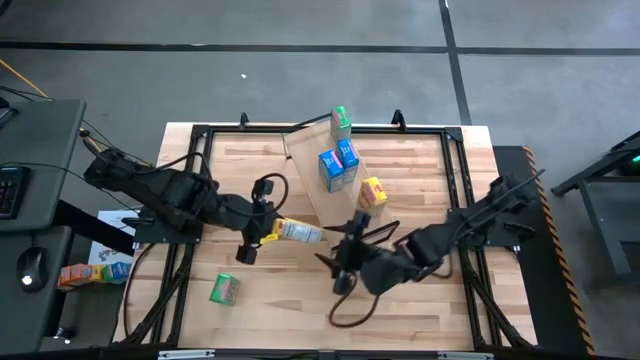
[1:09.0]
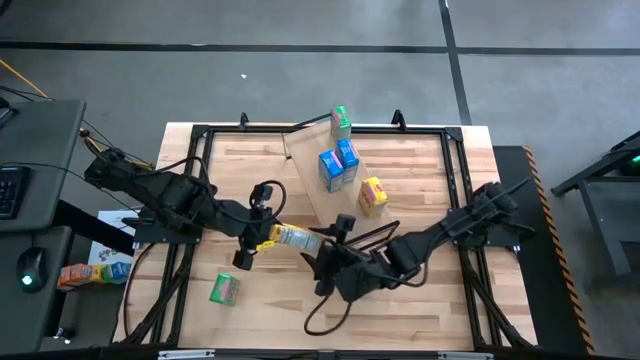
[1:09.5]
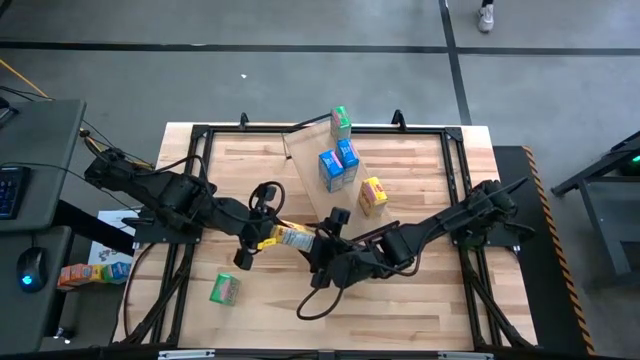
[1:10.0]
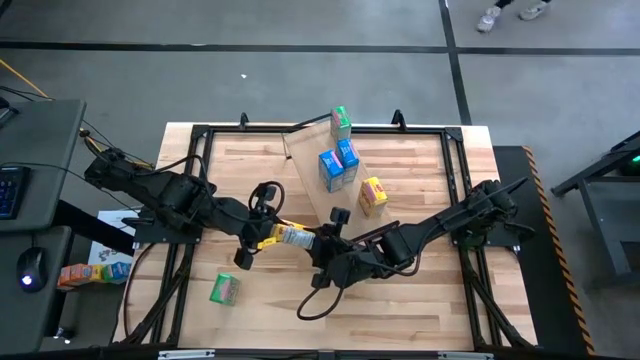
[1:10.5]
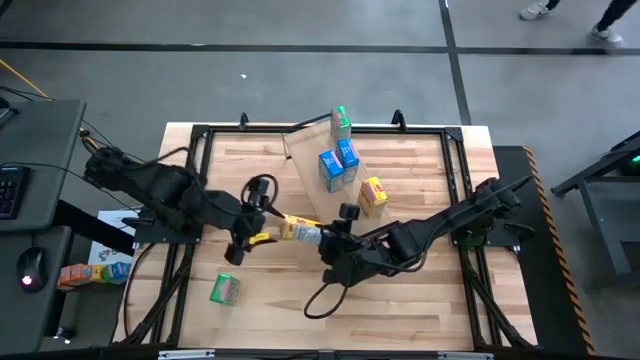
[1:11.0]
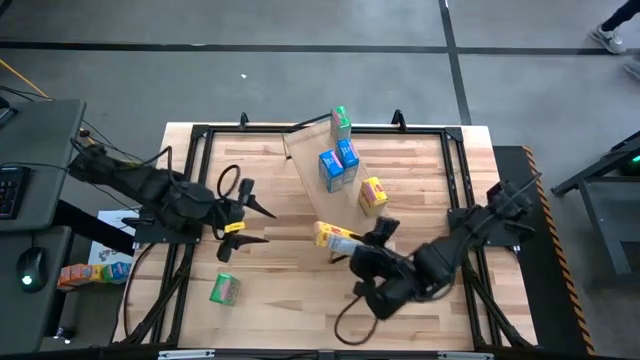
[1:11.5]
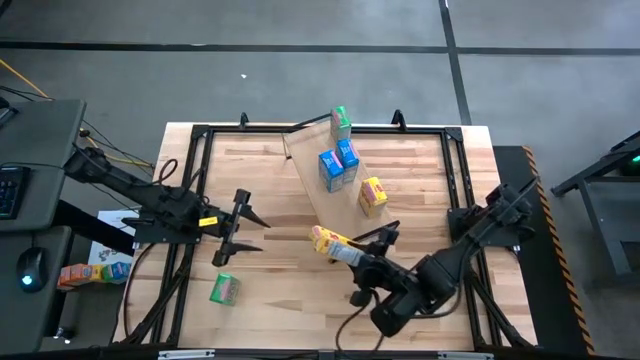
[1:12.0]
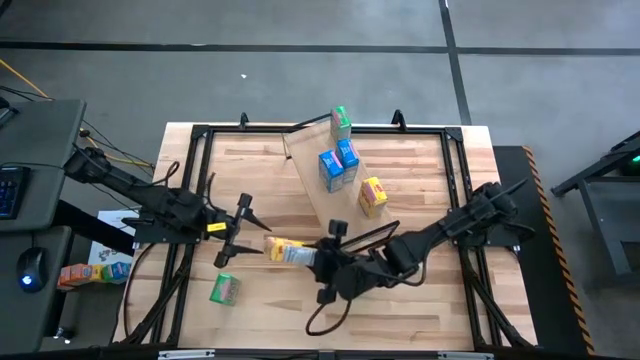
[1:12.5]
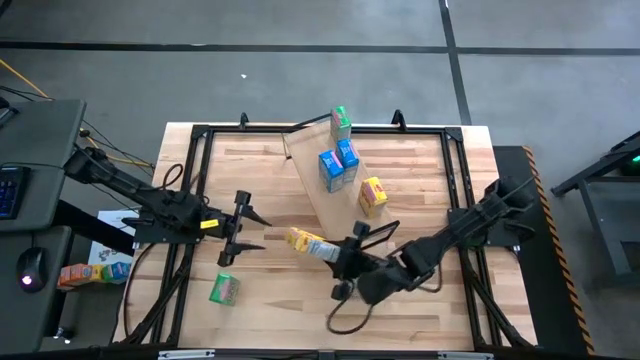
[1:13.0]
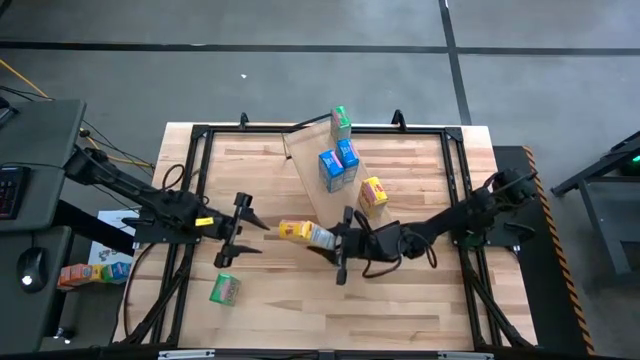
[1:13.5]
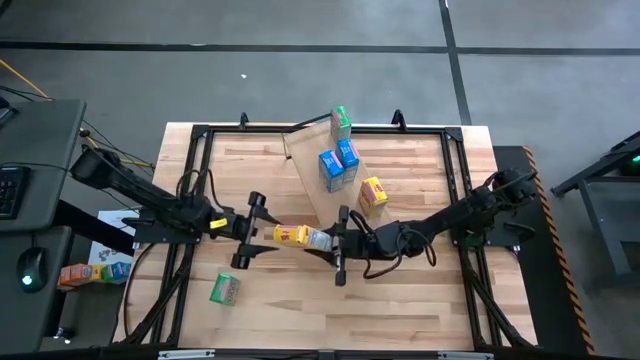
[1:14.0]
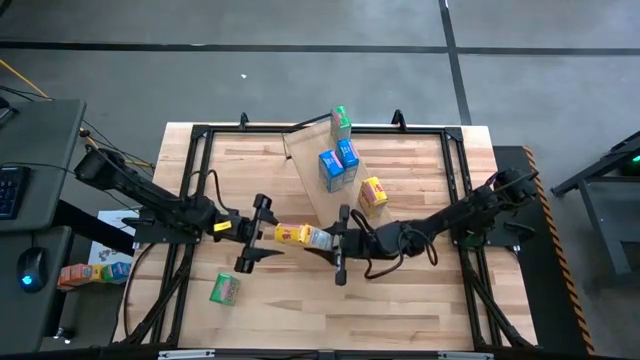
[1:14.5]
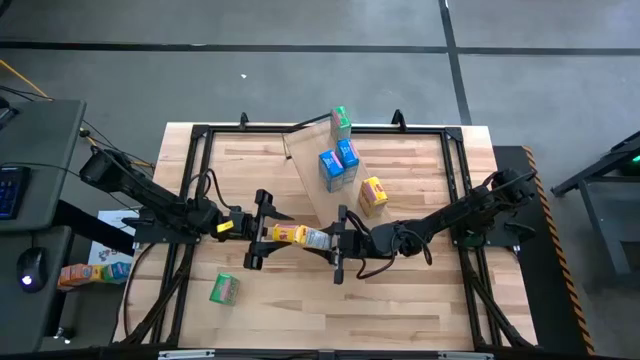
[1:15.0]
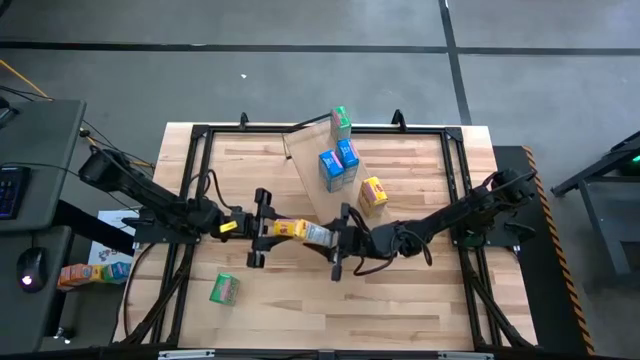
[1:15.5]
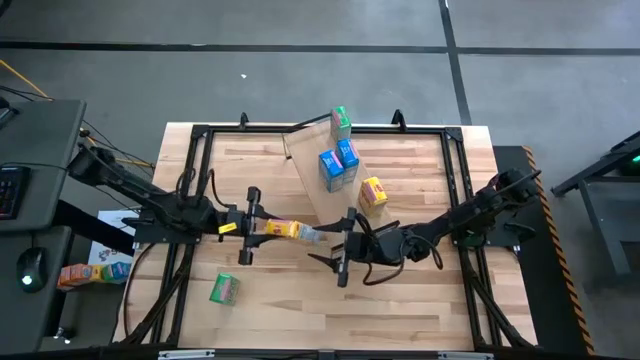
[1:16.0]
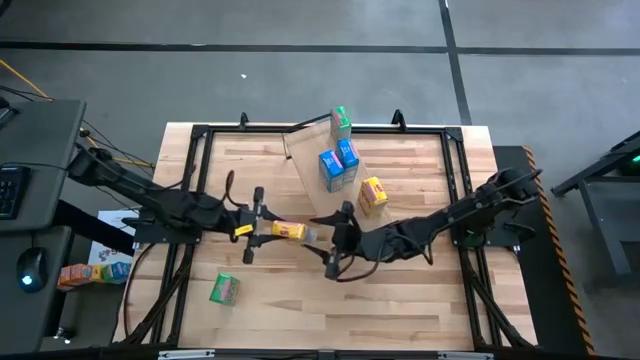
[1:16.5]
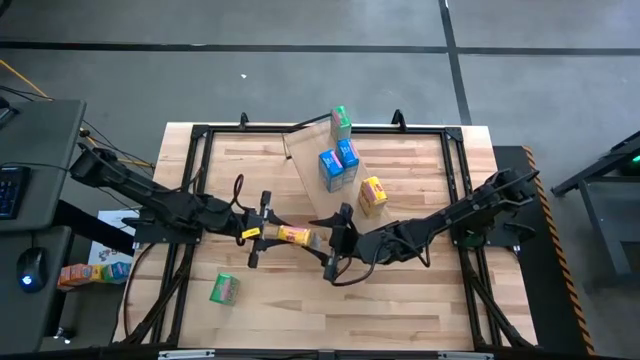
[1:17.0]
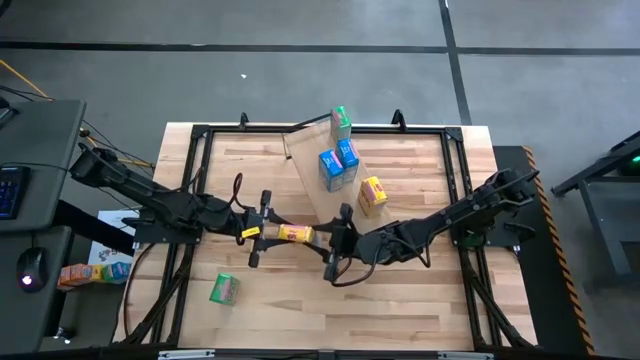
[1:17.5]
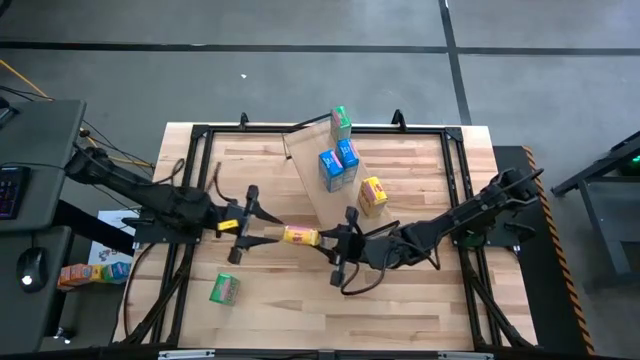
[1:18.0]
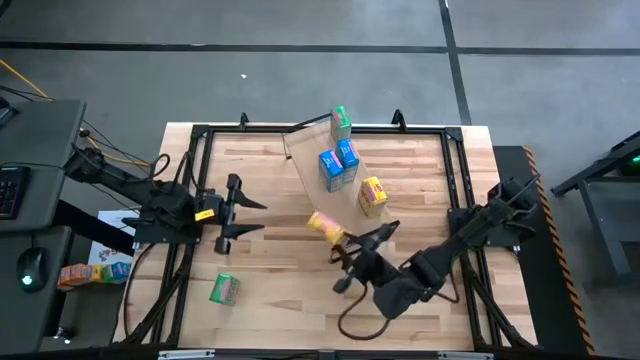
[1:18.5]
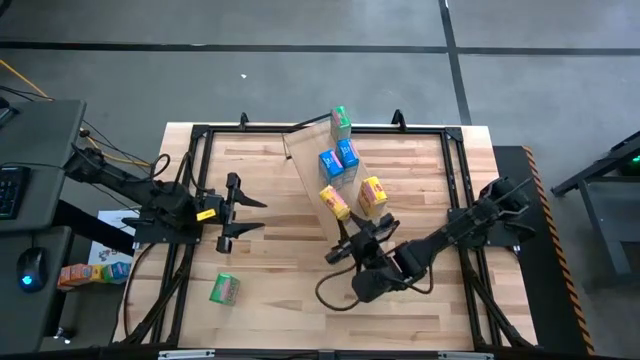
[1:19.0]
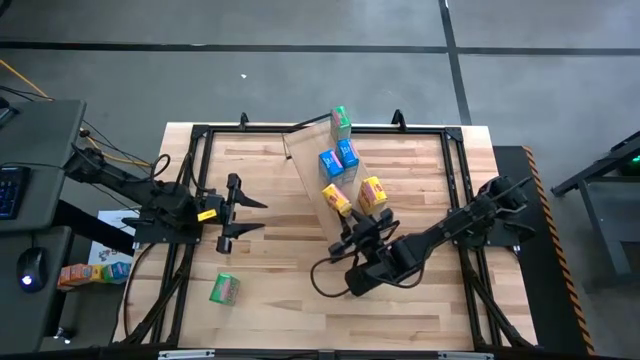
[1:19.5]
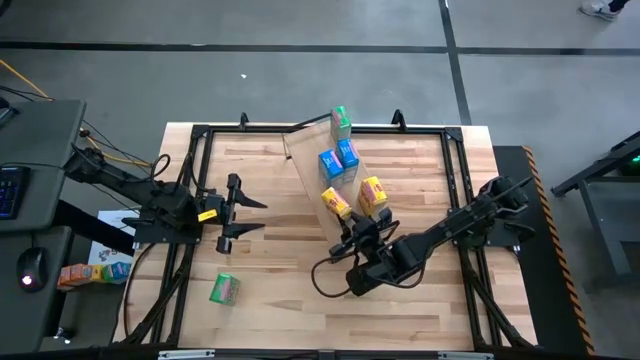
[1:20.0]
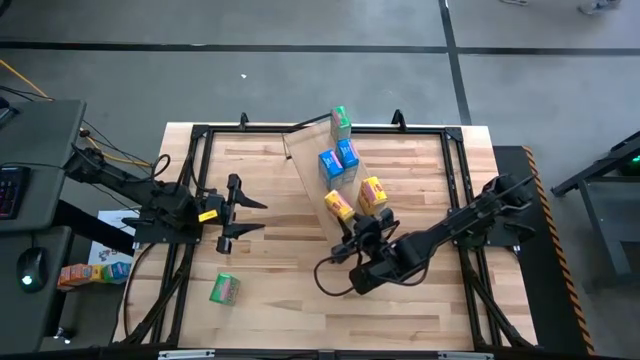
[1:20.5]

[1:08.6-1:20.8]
Task: Stack cereal on shelf
Put the yellow cereal box on the shelf aligned with the other yellow cereal box

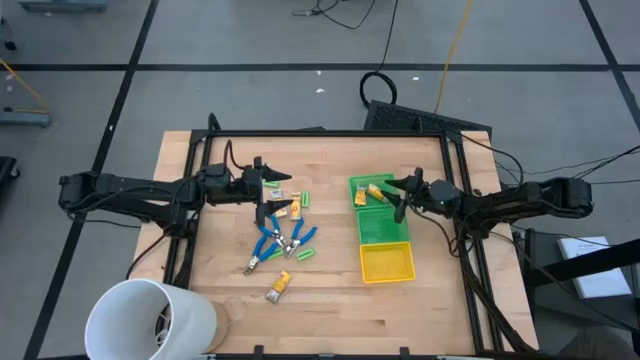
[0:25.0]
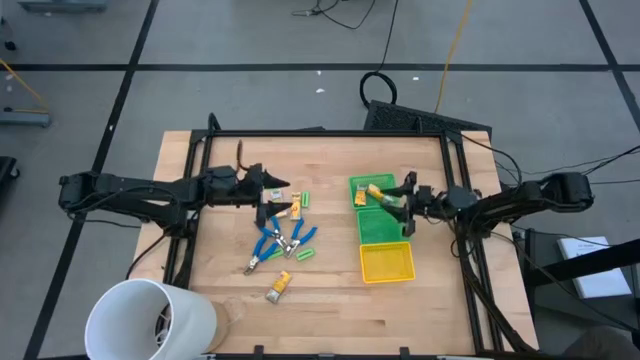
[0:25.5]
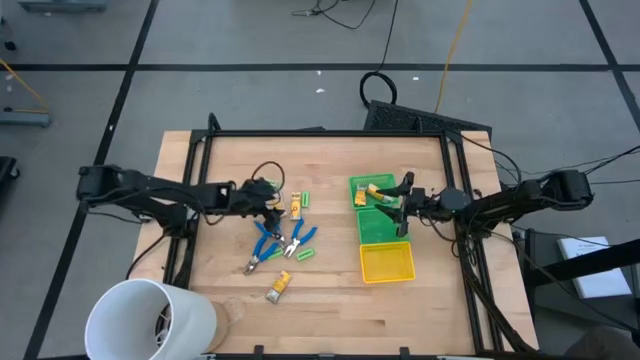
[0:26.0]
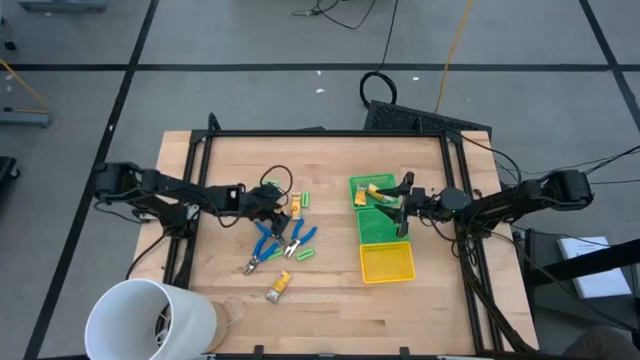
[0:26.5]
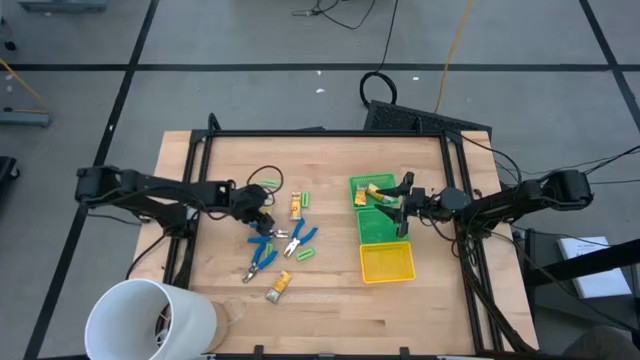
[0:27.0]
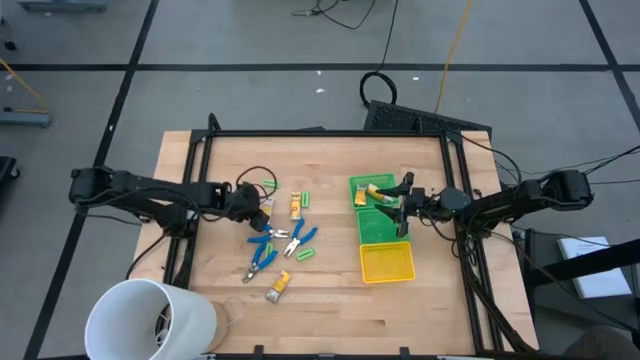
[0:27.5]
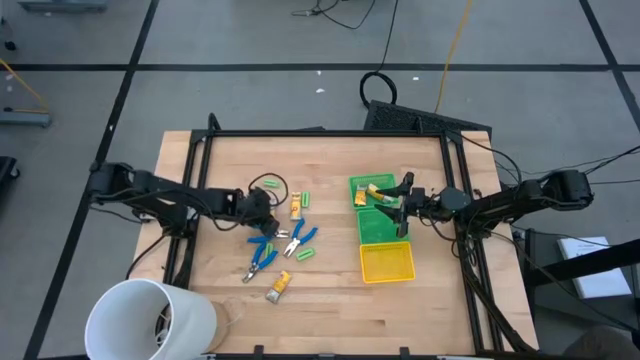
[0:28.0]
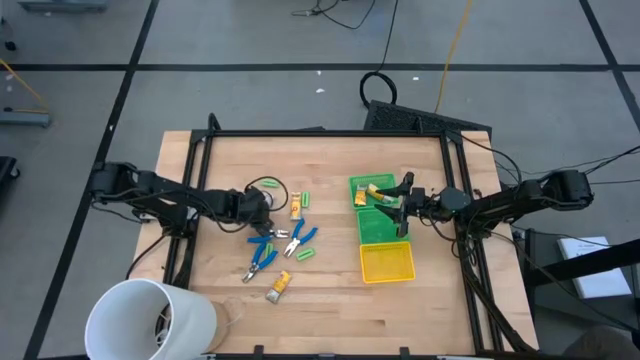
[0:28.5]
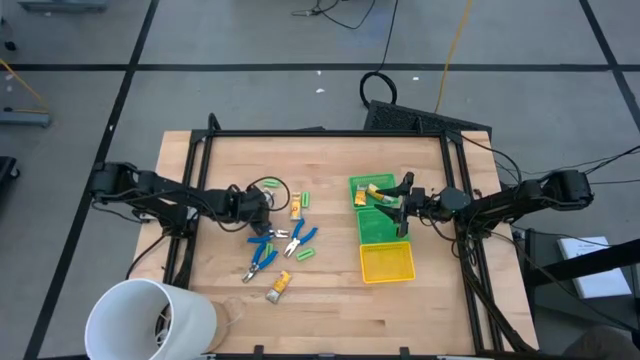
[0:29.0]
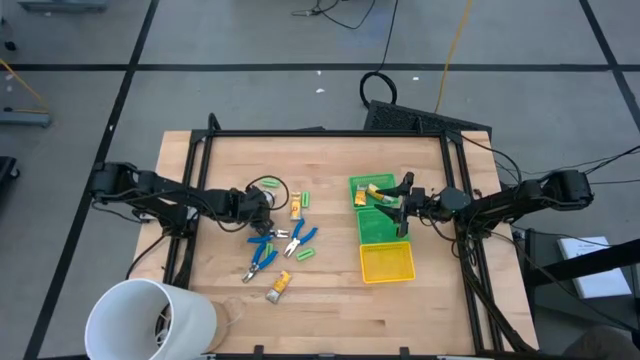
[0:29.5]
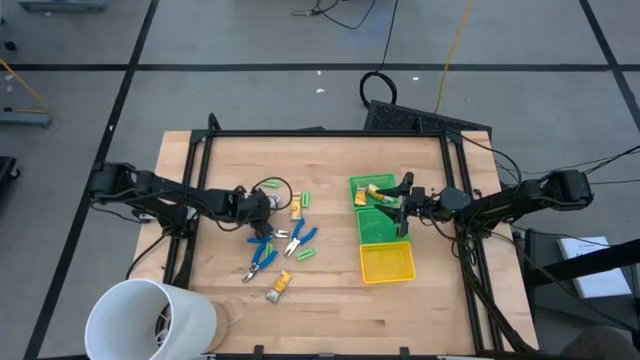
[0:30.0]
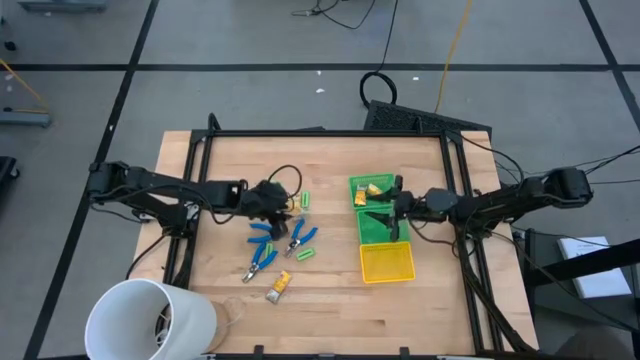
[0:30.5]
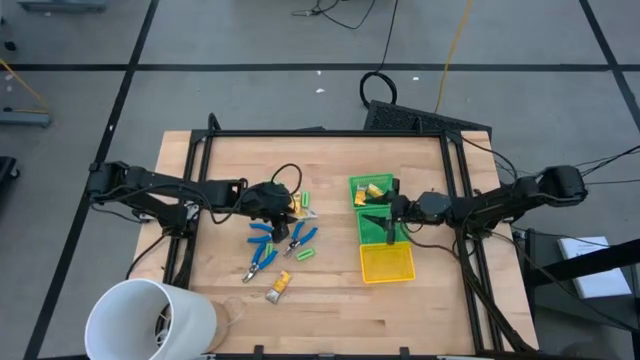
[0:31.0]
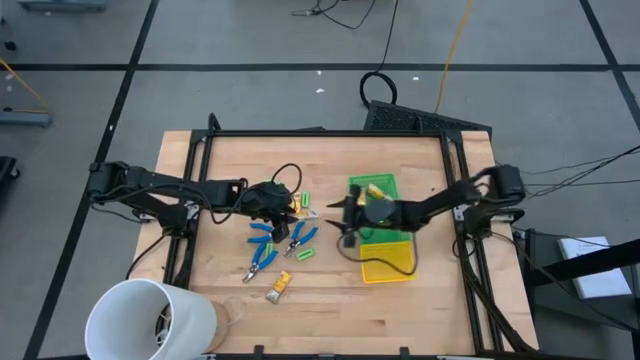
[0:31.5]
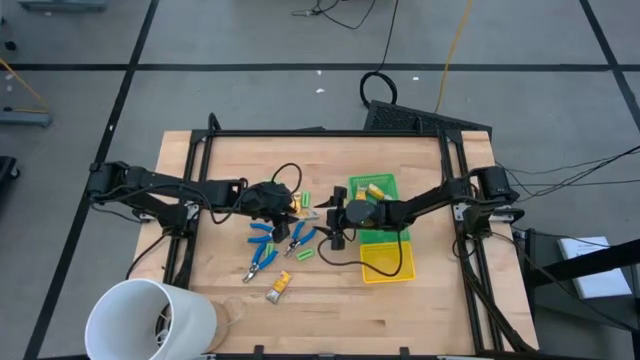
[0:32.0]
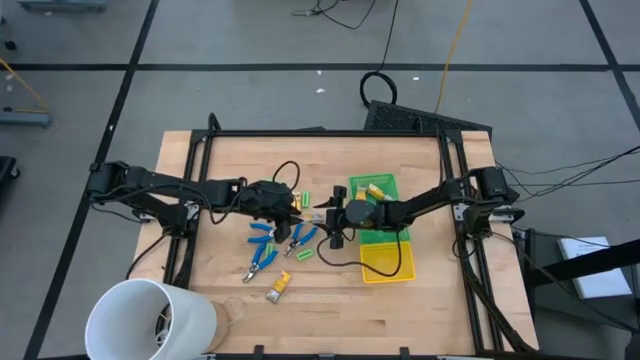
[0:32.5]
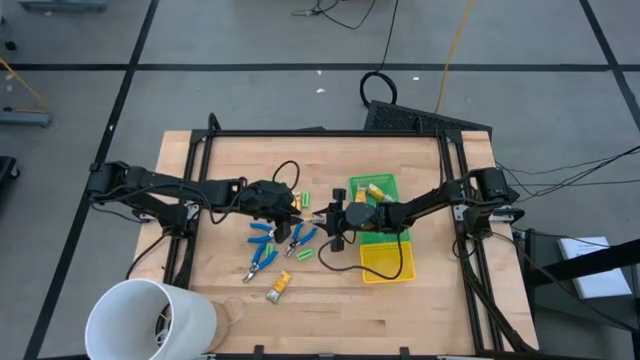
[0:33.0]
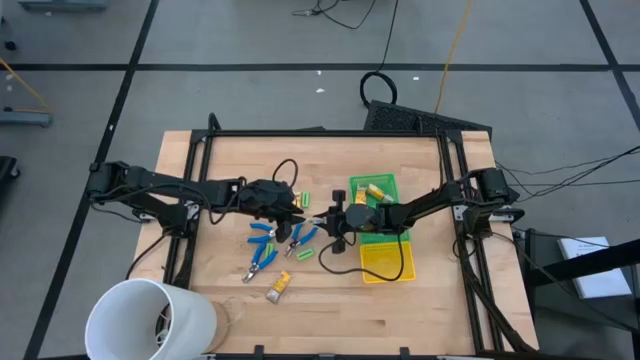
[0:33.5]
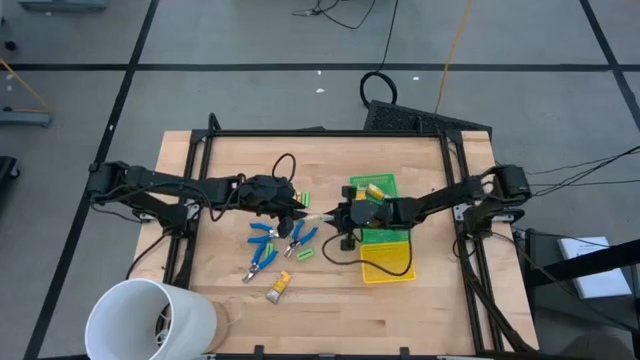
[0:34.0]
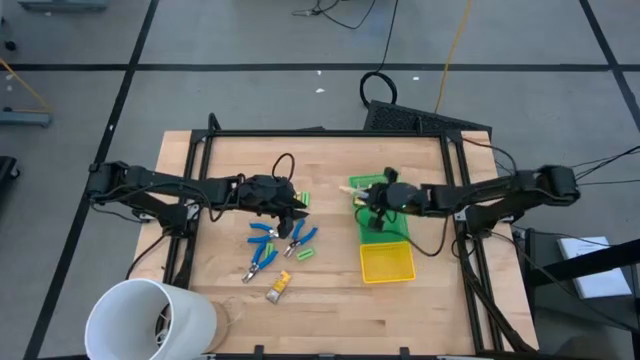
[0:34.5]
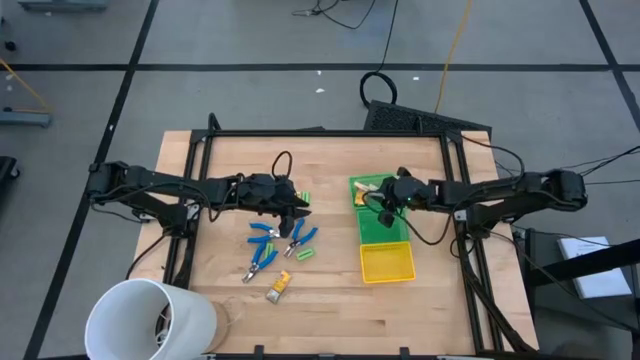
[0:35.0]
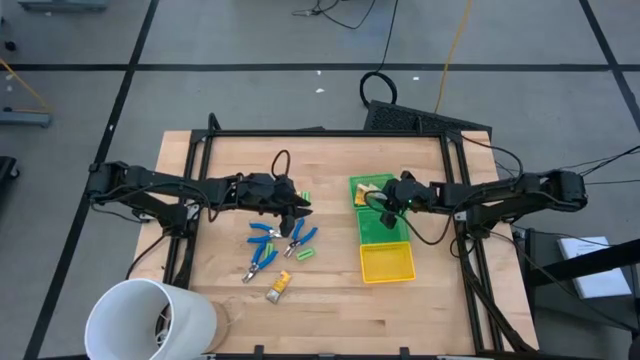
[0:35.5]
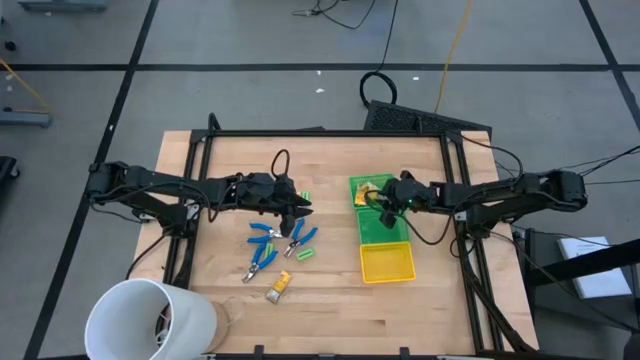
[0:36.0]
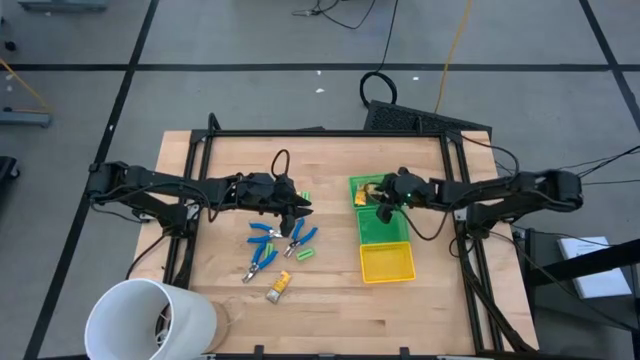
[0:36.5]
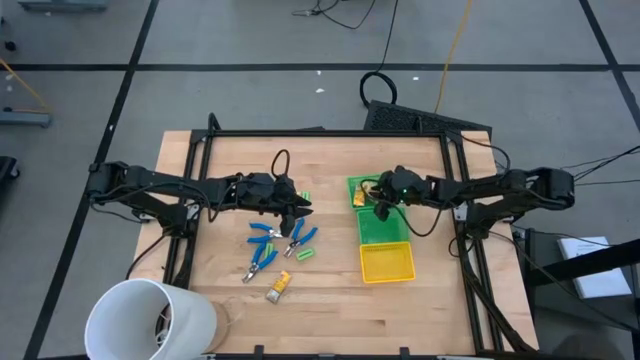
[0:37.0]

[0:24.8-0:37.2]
Task: Pick & Place School Supplies
Put the yellow crayon box into the top green bin
